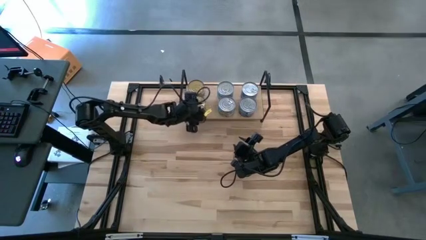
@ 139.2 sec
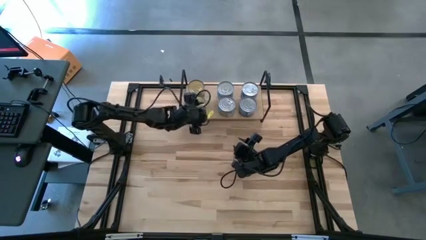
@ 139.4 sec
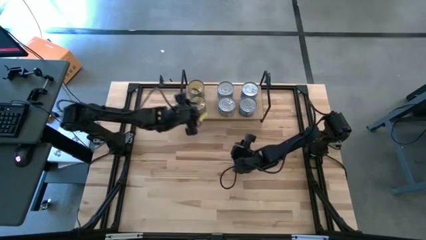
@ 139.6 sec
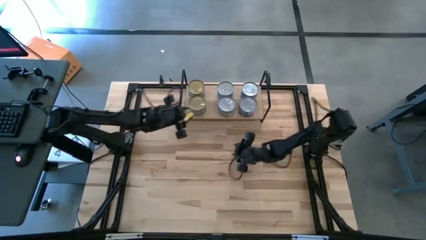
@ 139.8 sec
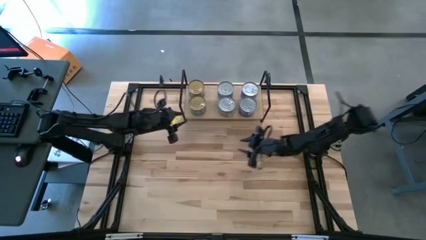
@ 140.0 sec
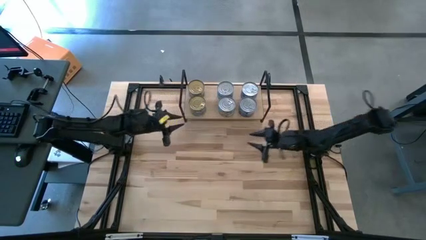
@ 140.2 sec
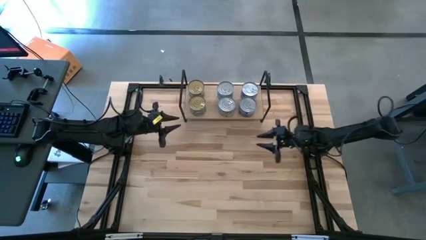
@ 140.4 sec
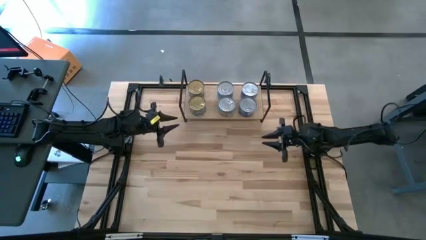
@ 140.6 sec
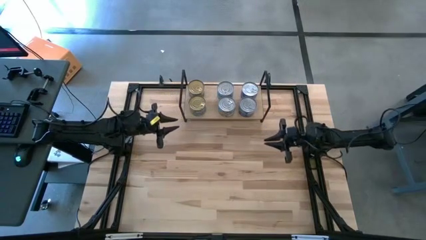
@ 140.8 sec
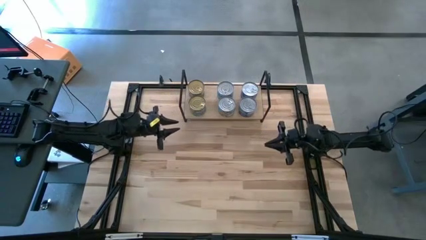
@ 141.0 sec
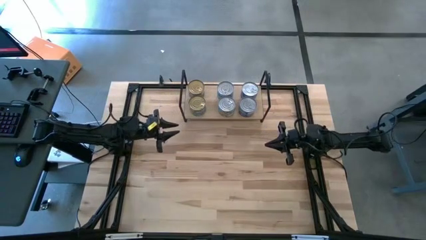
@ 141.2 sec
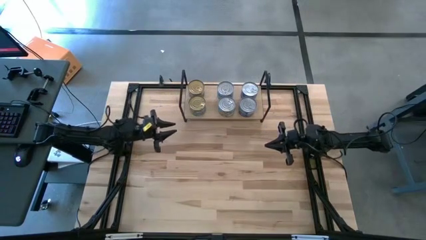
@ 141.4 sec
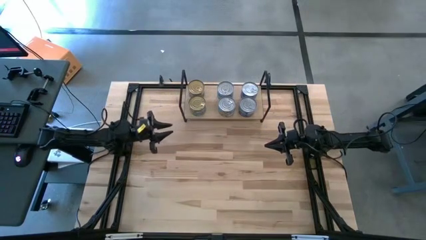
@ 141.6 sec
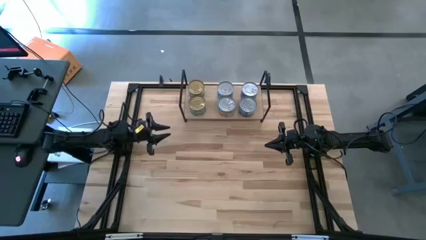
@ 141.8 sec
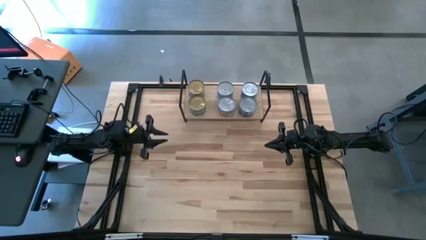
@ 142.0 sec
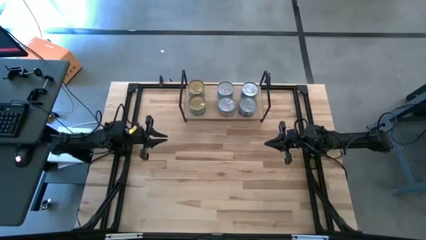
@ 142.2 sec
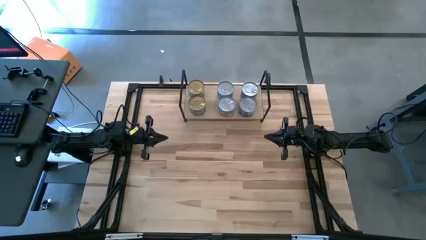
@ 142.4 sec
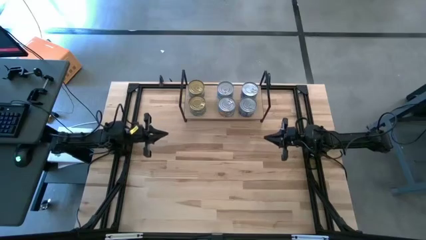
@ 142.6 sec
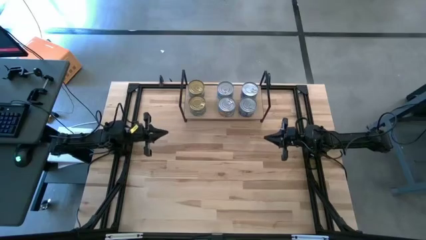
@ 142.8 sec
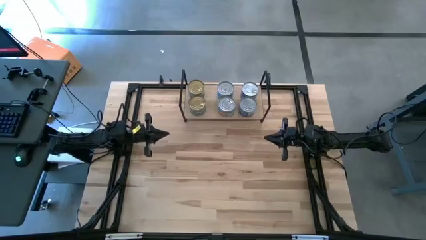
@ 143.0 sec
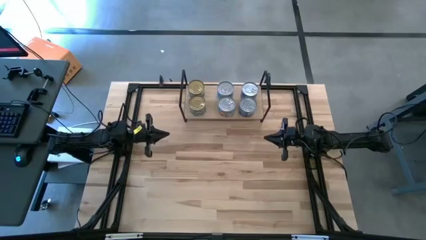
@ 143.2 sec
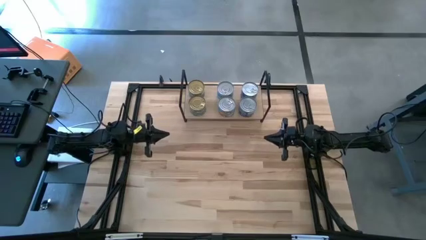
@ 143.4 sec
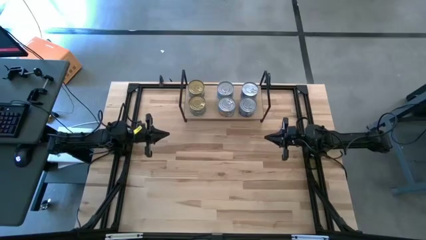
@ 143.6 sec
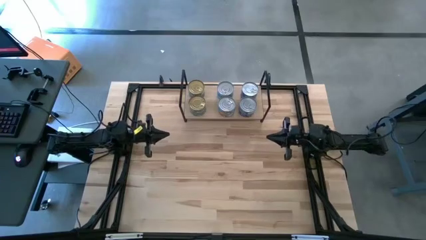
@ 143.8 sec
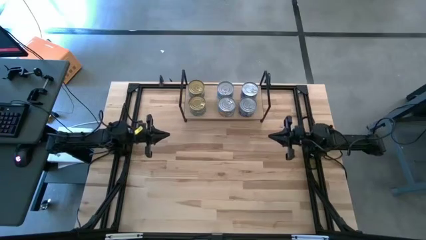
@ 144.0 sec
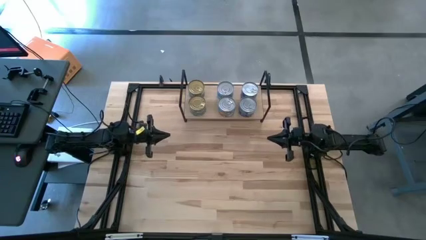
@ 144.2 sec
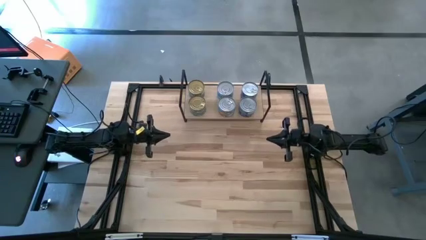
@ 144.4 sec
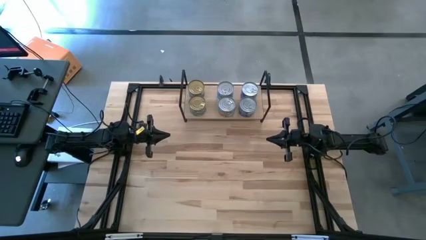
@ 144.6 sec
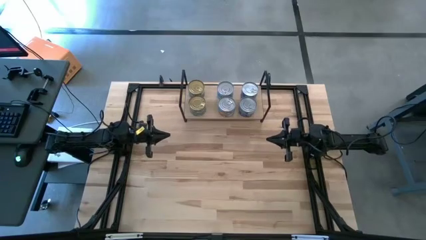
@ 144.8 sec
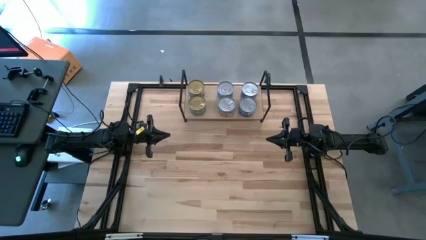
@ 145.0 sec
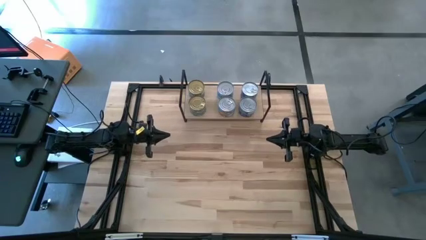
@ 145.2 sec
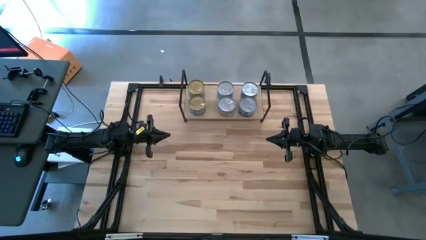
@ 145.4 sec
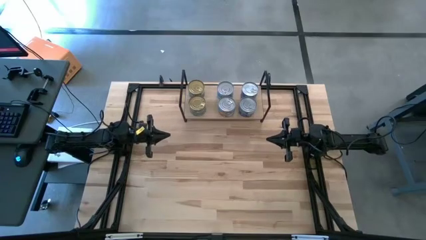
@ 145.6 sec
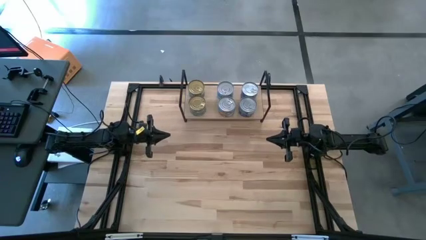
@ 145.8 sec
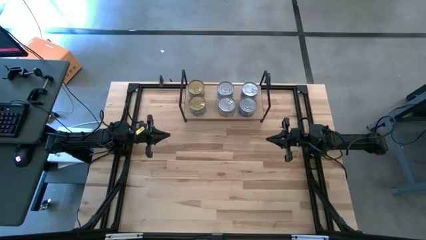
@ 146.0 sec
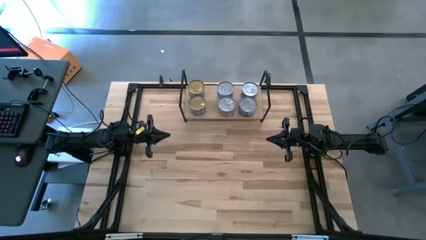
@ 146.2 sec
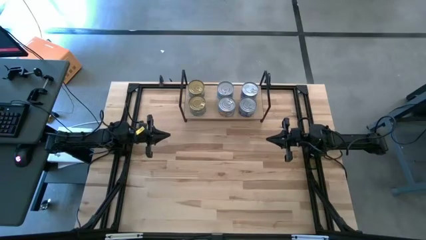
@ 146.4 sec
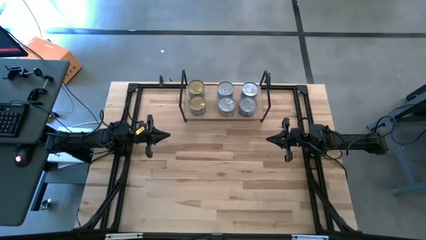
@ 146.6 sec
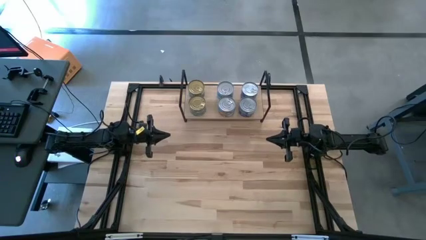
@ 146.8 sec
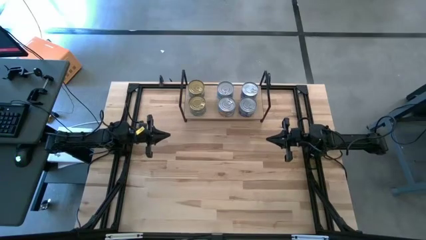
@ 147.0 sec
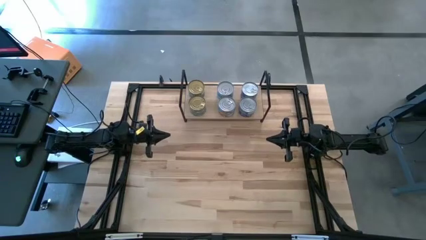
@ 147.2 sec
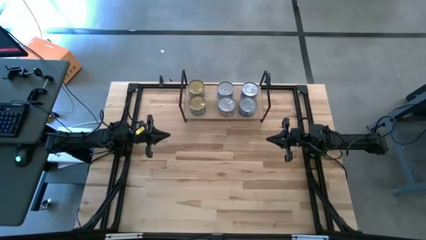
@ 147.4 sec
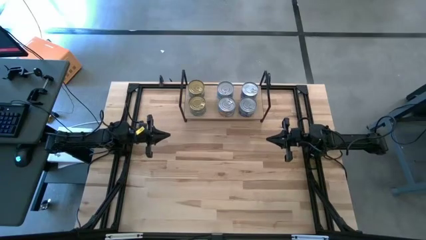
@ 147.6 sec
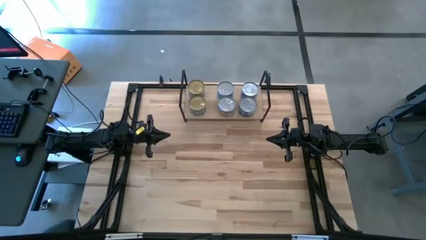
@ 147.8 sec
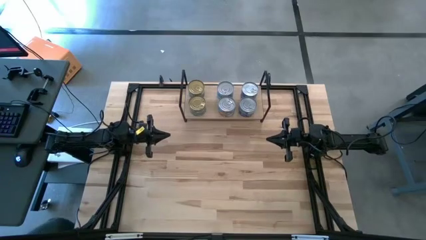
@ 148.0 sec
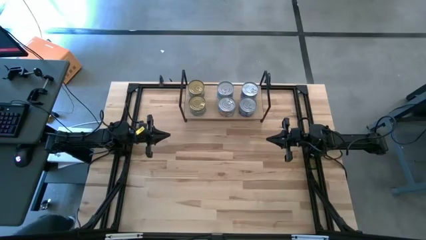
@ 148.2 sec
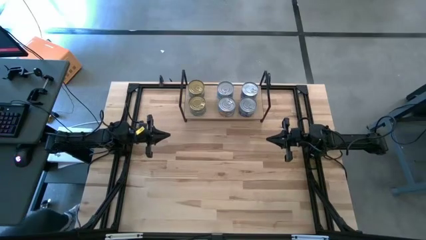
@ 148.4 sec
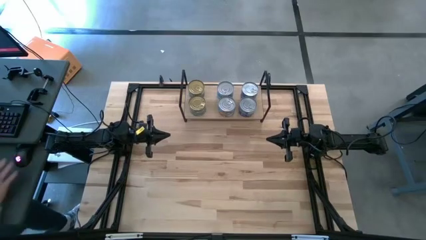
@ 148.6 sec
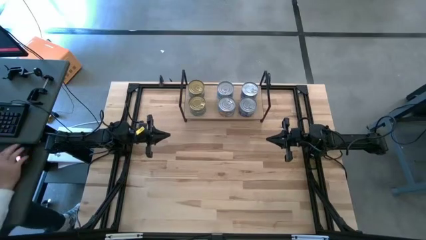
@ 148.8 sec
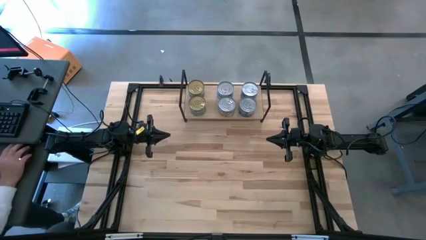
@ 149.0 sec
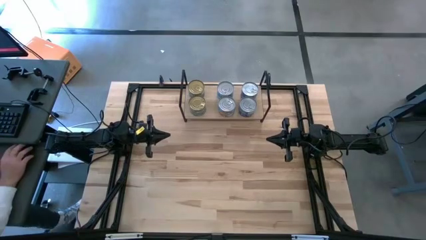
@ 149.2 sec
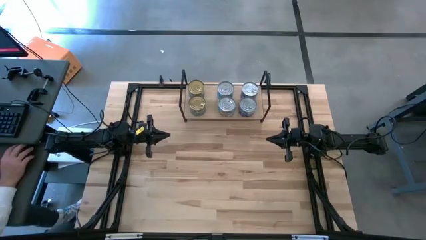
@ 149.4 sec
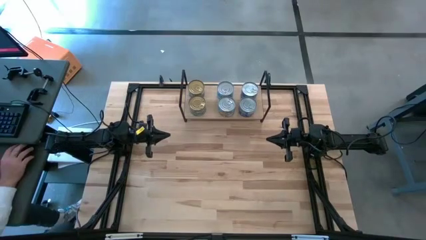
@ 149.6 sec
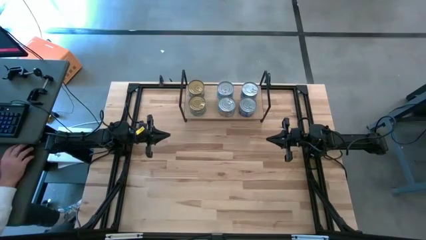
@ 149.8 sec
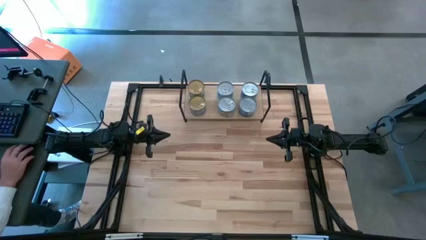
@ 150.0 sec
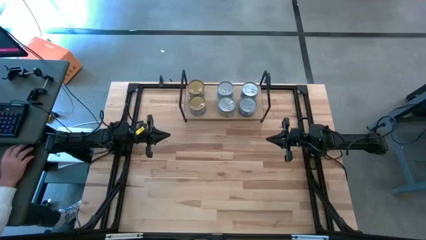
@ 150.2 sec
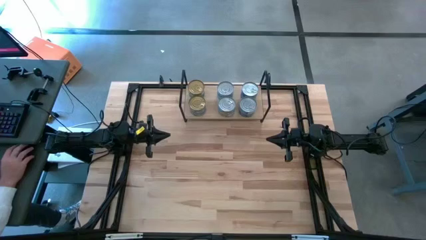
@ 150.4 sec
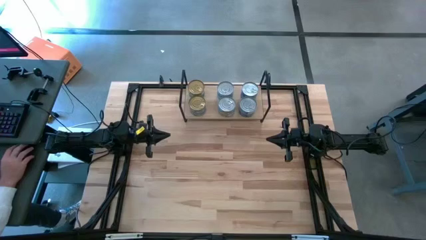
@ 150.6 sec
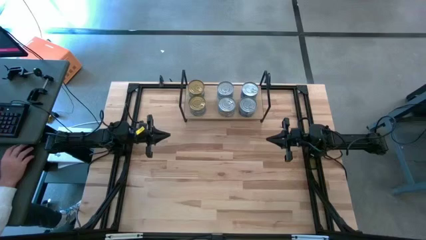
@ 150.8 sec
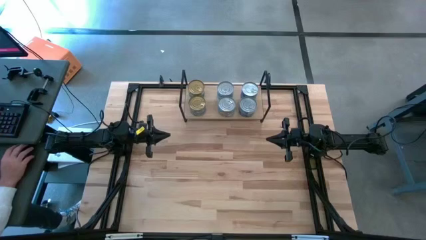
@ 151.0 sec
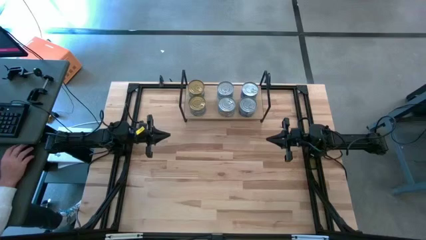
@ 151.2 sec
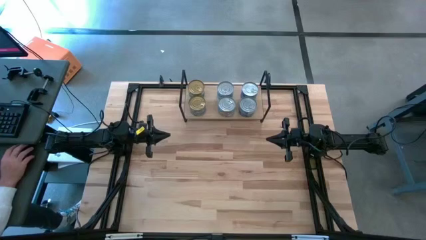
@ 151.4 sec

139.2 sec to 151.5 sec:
Task: Stack canned seafood by type on shelf
Return to Home Position
